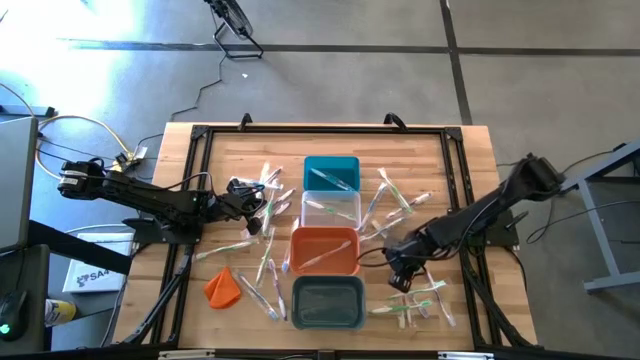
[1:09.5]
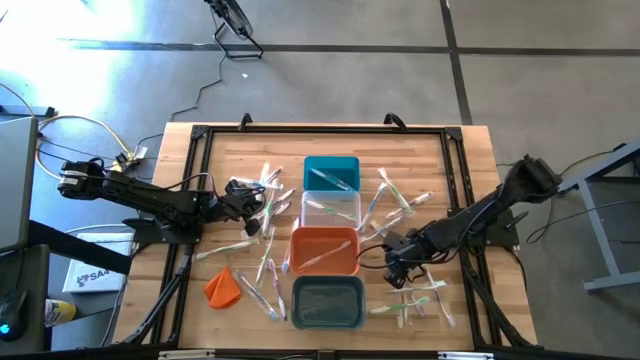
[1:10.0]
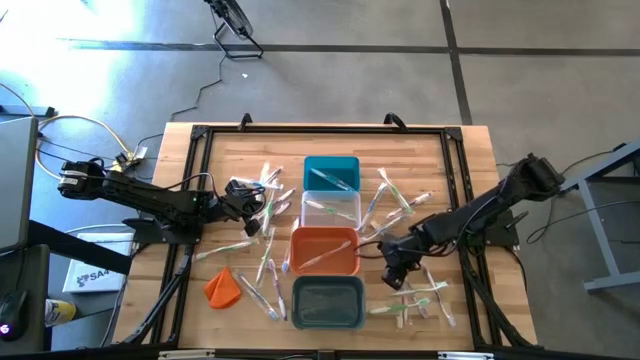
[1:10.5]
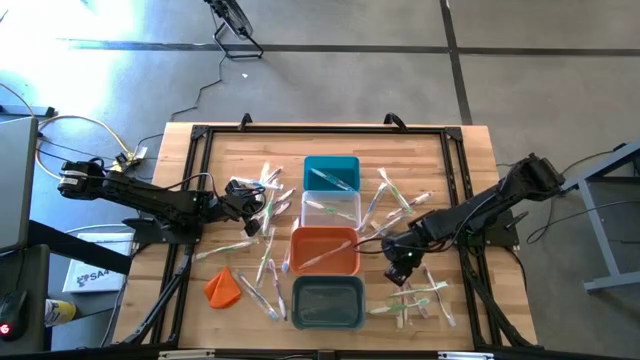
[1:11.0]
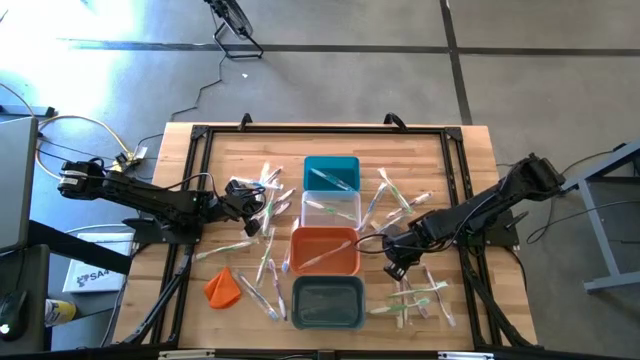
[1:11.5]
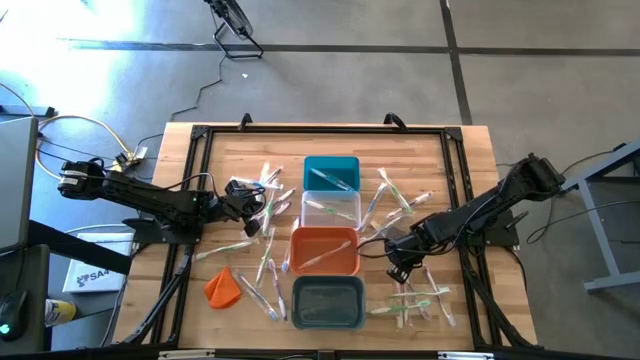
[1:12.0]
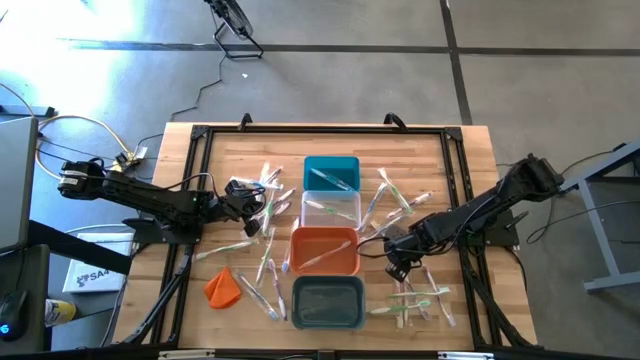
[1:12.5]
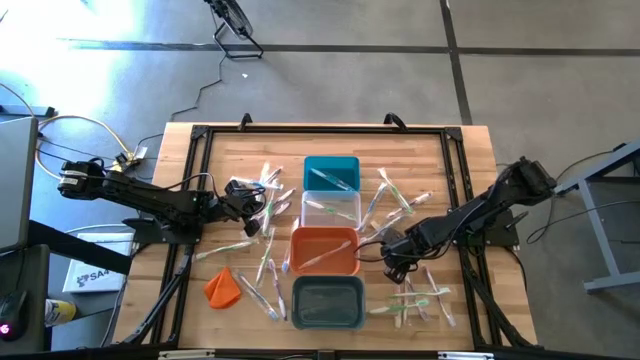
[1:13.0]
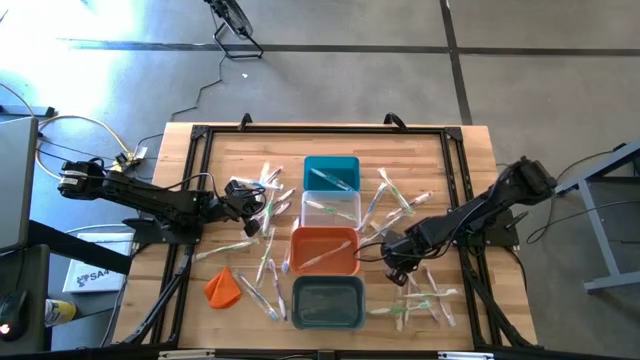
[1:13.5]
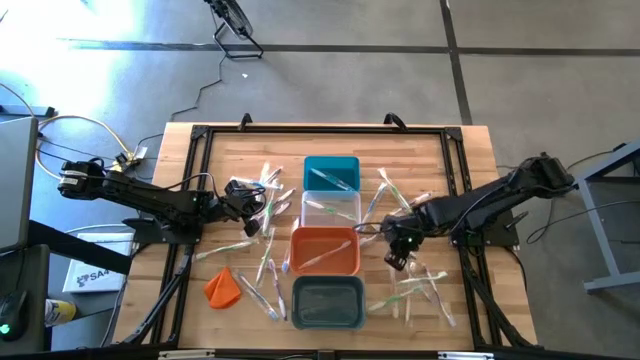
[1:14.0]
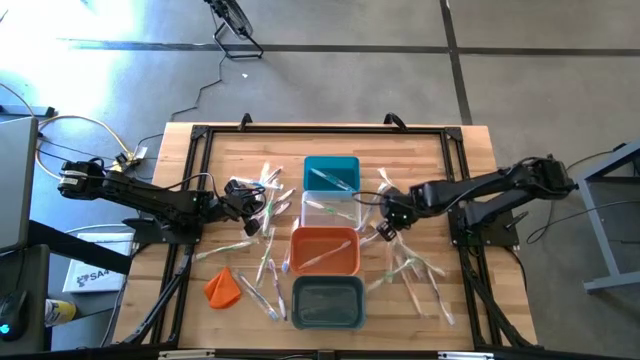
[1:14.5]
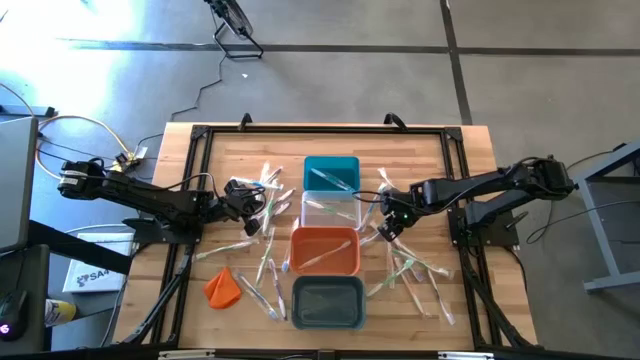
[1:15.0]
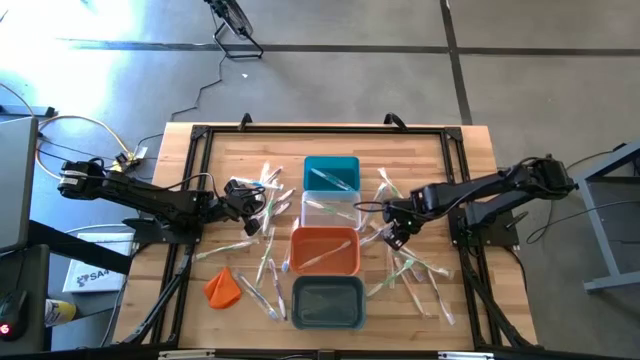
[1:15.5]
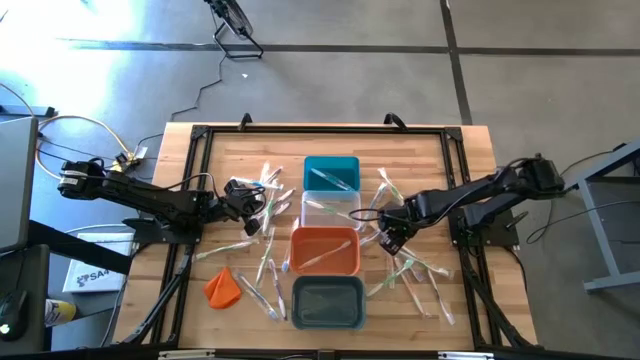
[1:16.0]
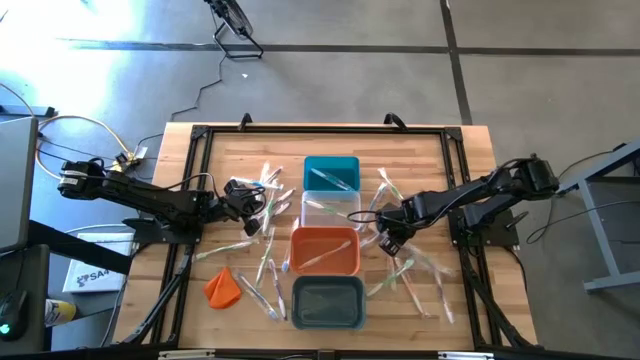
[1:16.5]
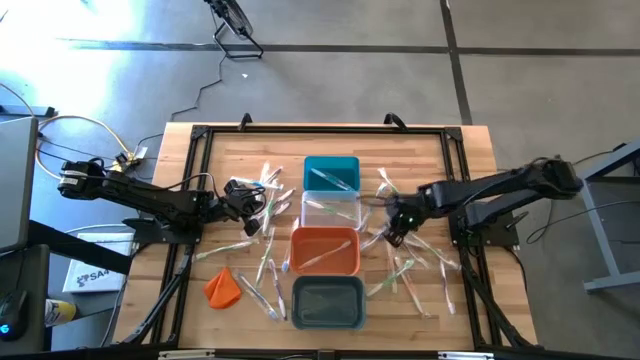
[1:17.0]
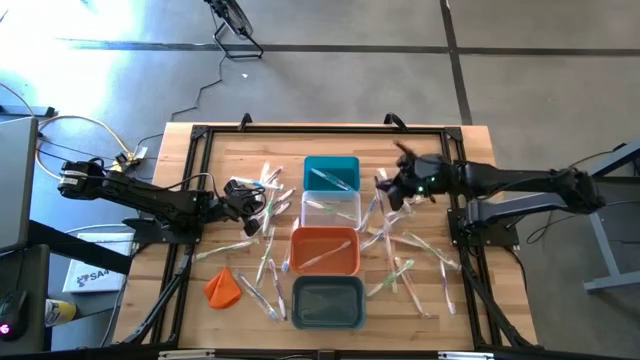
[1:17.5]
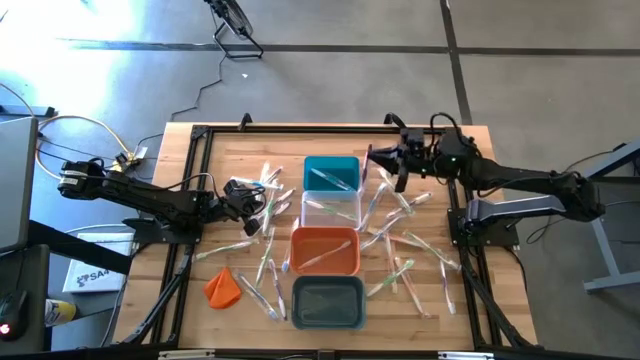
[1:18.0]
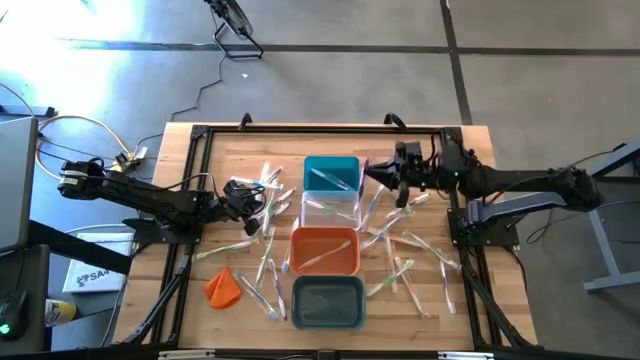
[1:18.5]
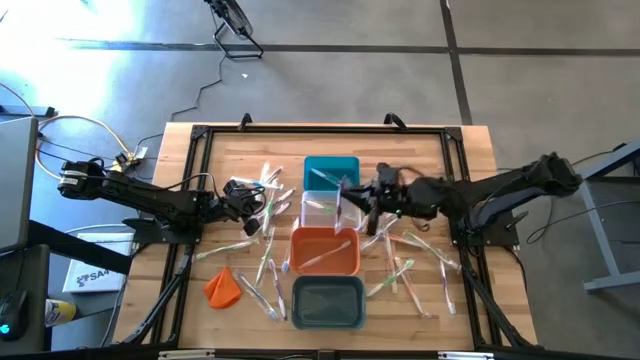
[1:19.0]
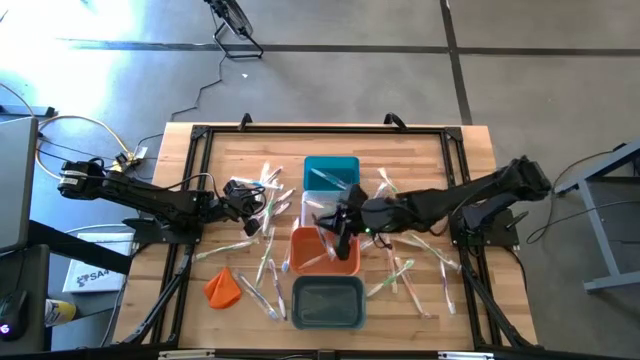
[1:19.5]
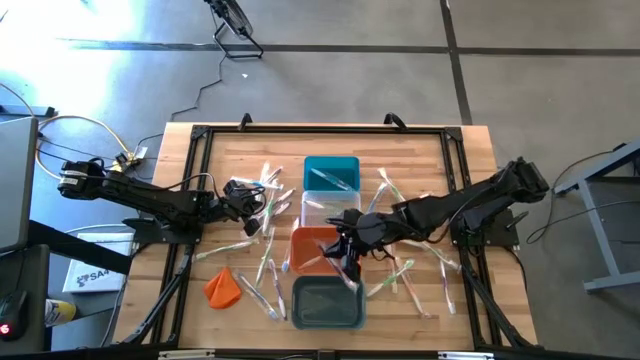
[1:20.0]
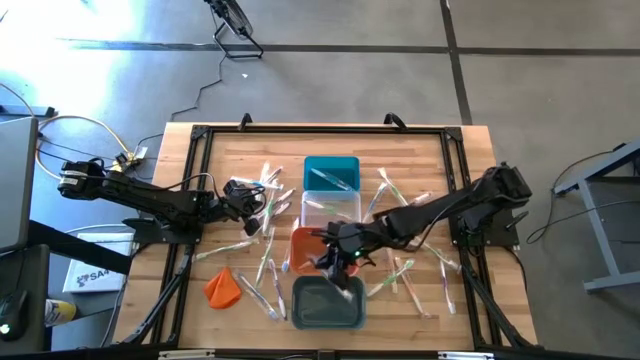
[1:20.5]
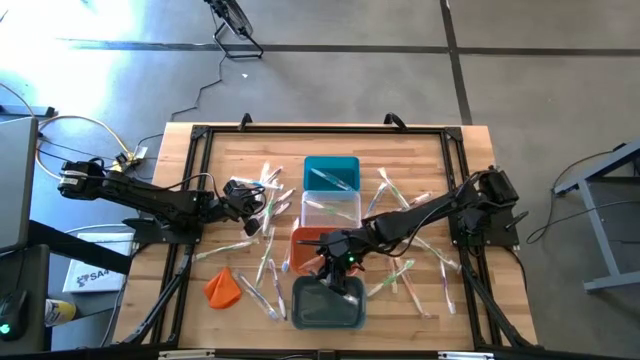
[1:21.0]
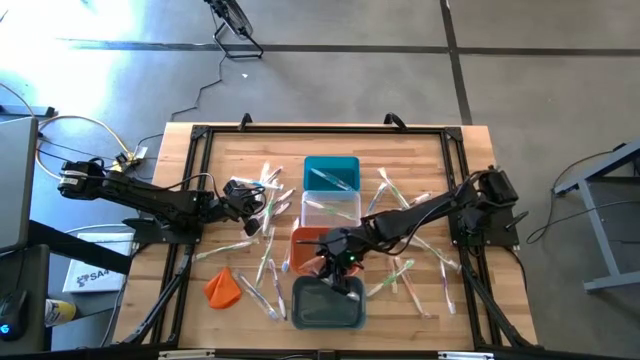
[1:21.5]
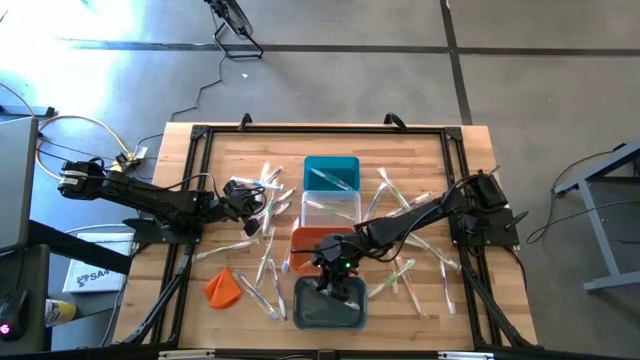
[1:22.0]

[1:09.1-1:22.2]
Task: Pick & Place Toothbrushes
Put the violet toothbrush into the green bin

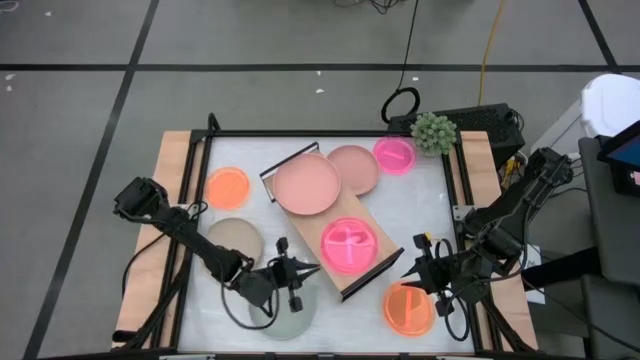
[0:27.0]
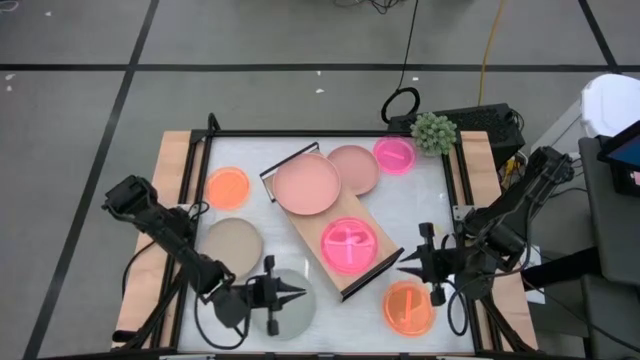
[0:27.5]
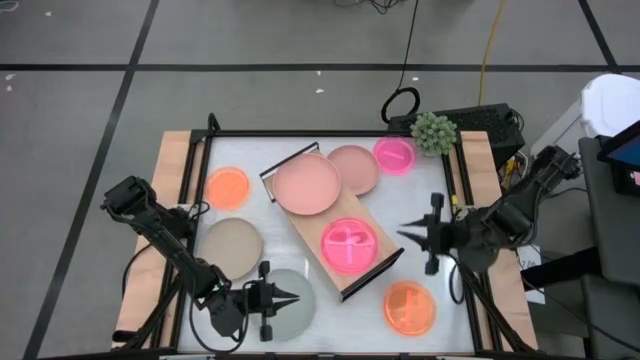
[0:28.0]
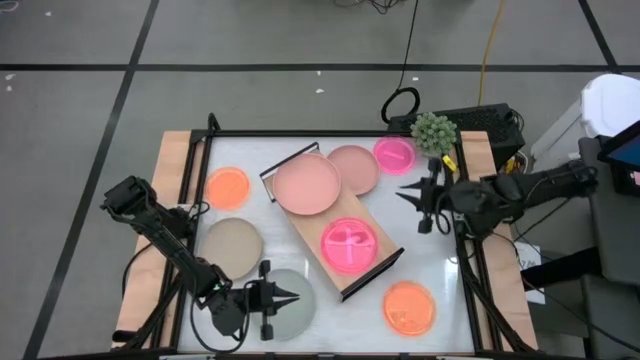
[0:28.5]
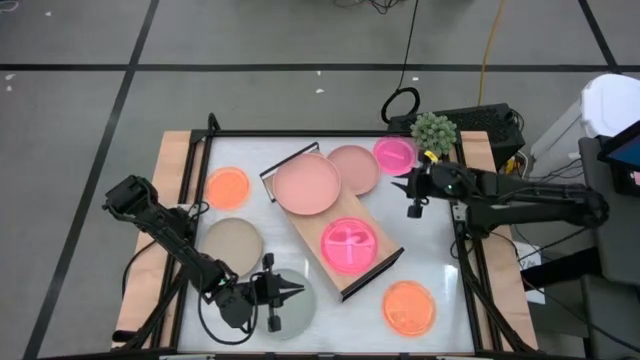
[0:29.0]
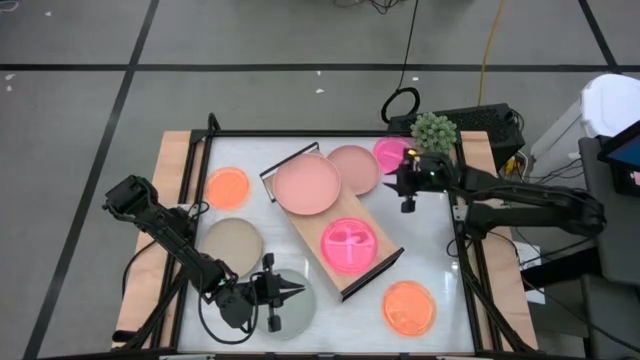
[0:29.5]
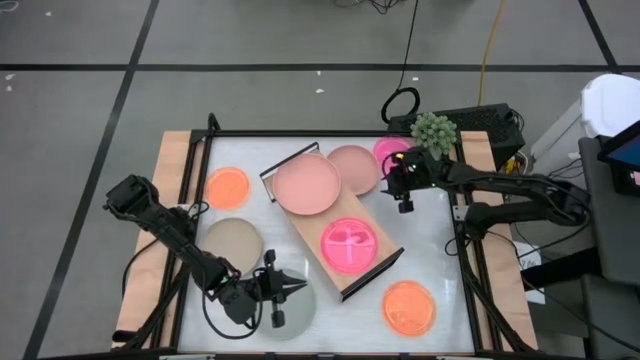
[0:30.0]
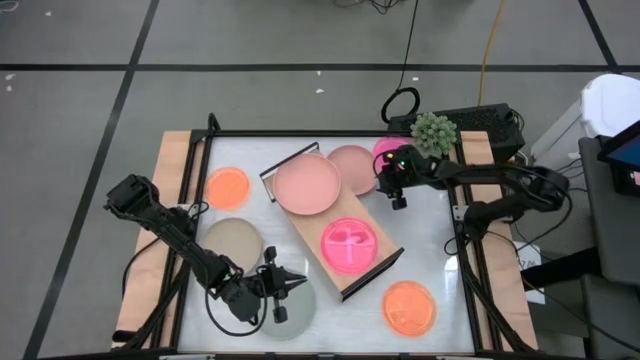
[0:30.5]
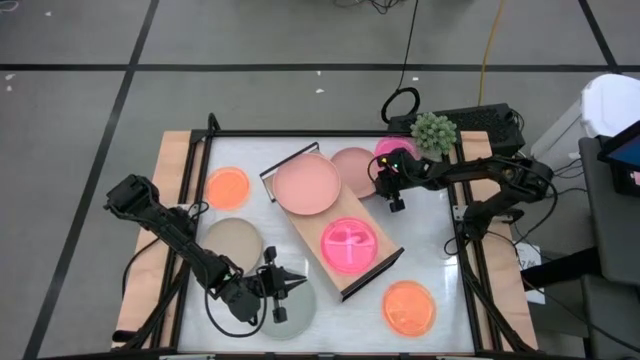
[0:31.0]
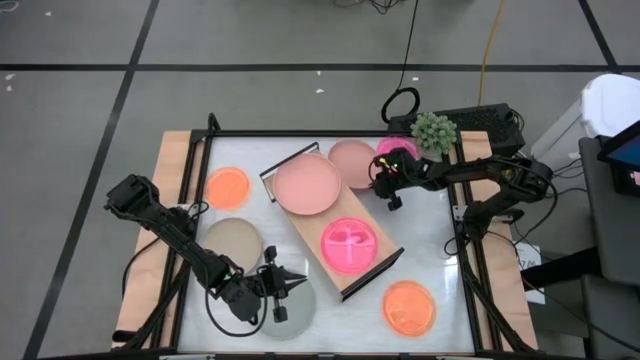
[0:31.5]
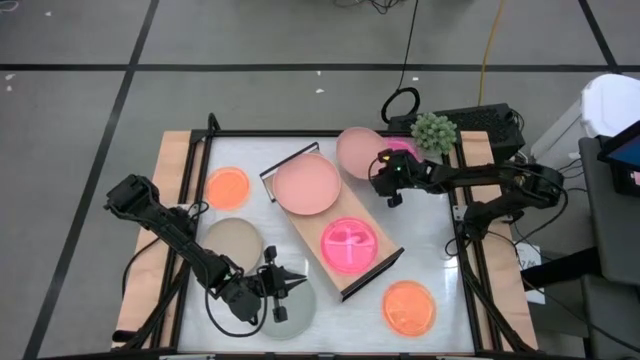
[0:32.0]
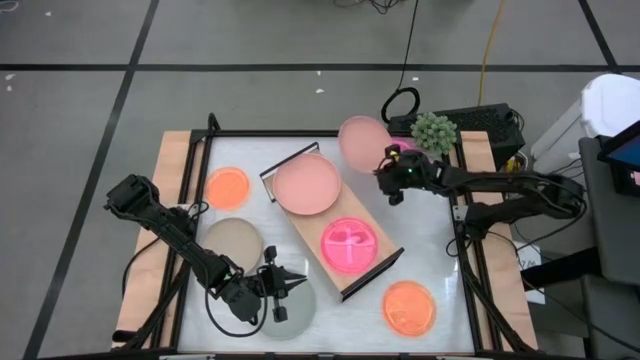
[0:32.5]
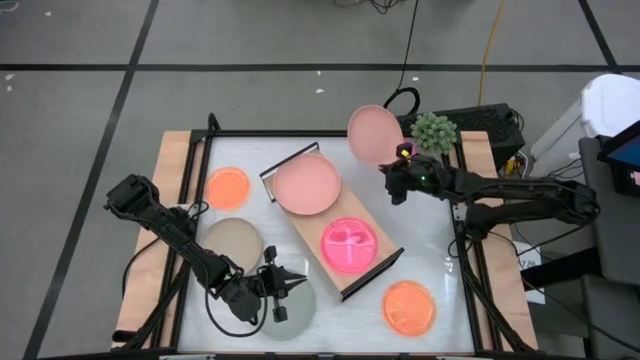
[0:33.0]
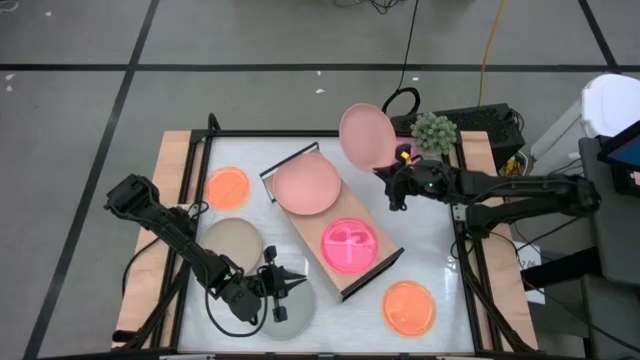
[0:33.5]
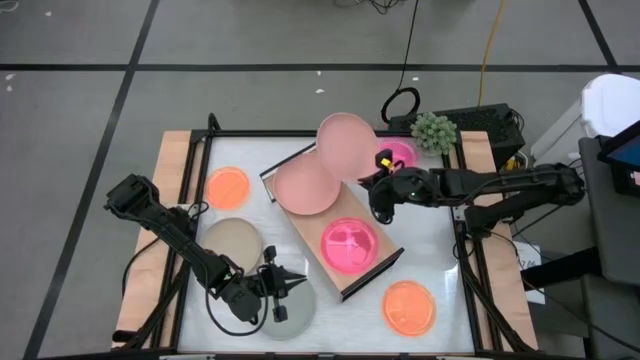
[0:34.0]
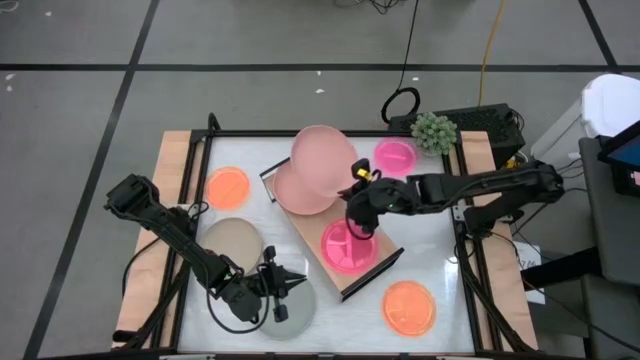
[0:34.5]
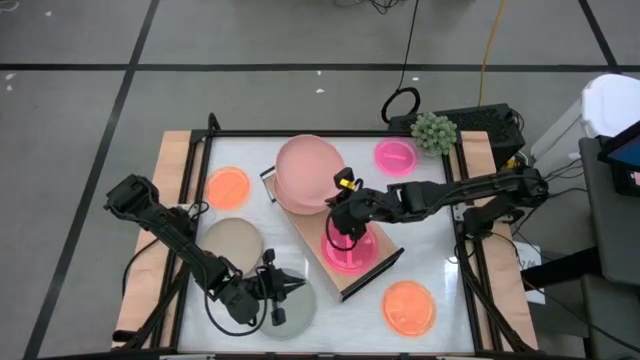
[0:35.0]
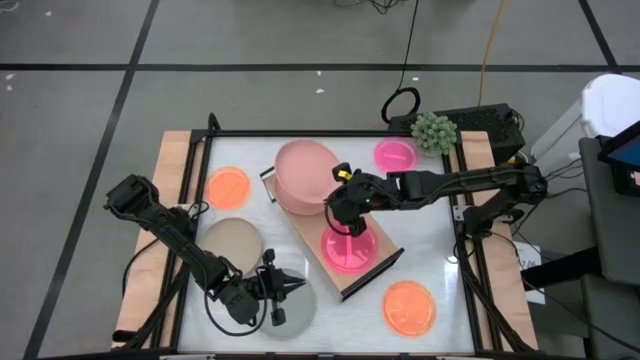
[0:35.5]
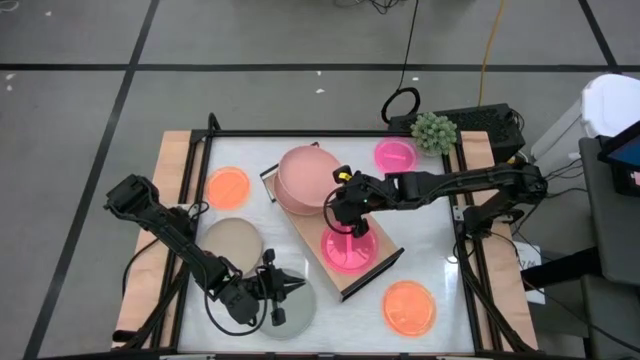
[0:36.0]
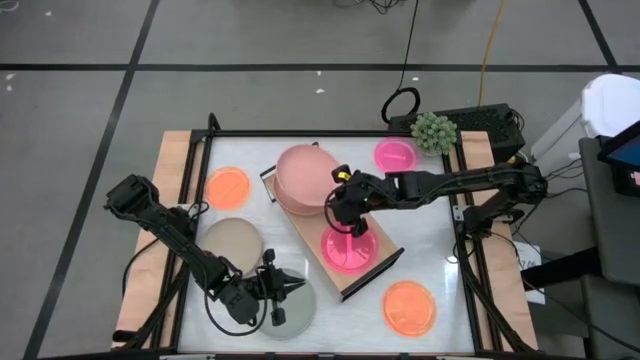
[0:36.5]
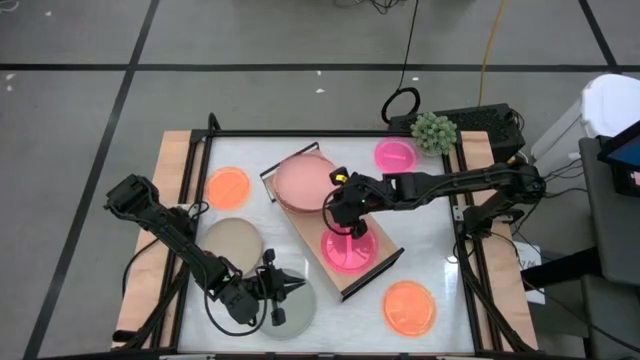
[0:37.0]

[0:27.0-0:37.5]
Task: Place and stack plates onto a shelf
Stack the large pink plate on top of the large pink plate on the shelf
